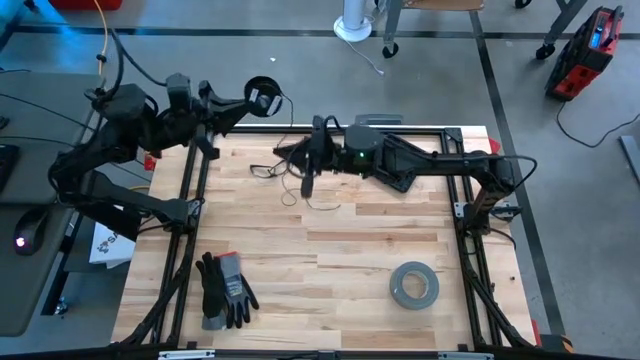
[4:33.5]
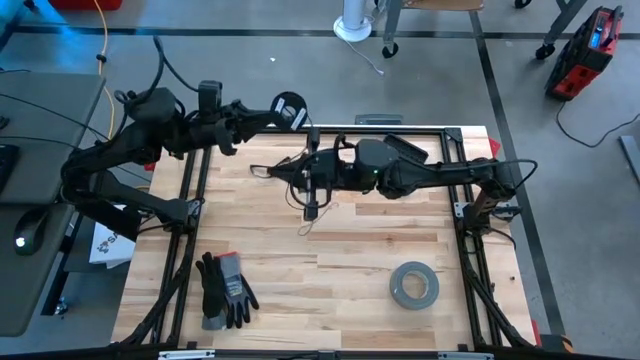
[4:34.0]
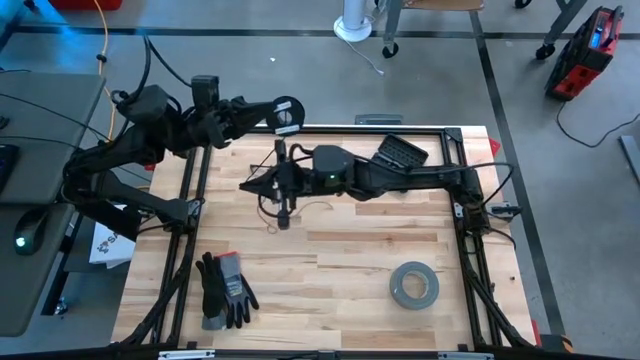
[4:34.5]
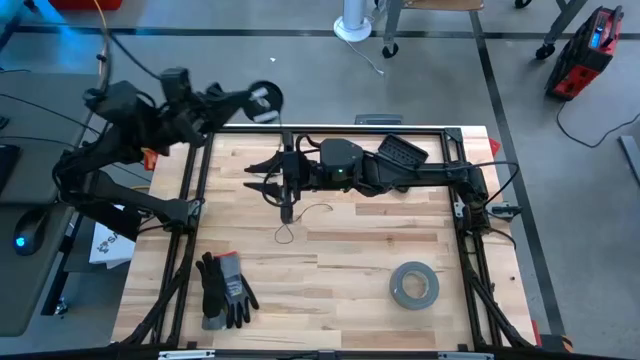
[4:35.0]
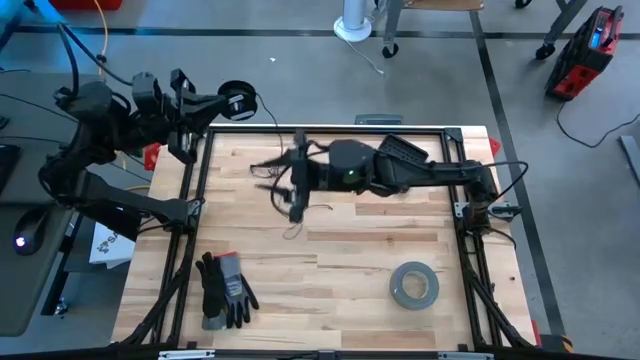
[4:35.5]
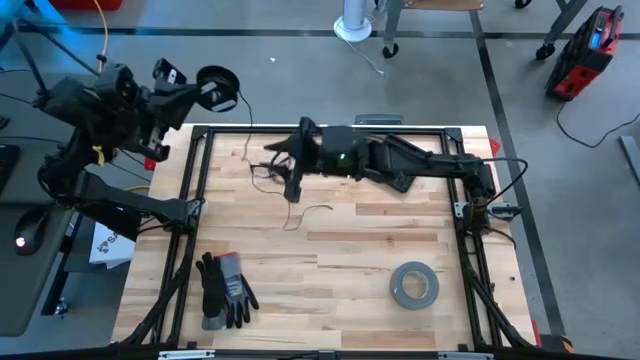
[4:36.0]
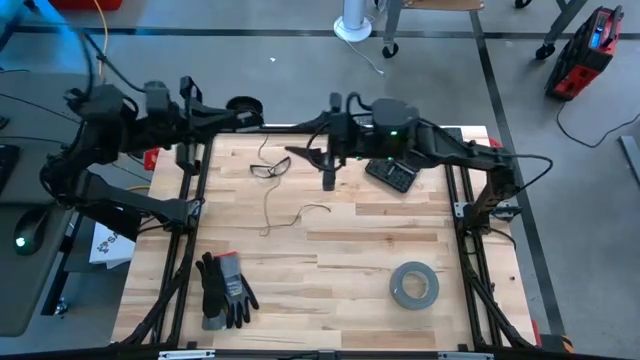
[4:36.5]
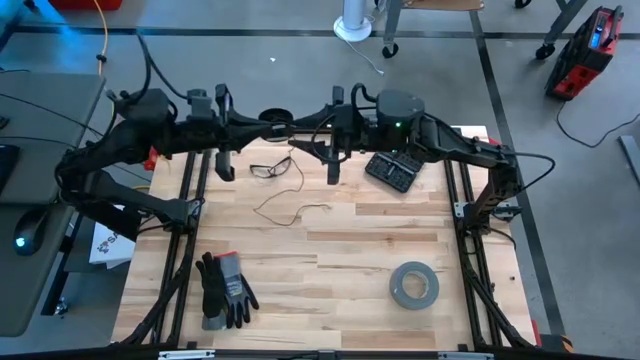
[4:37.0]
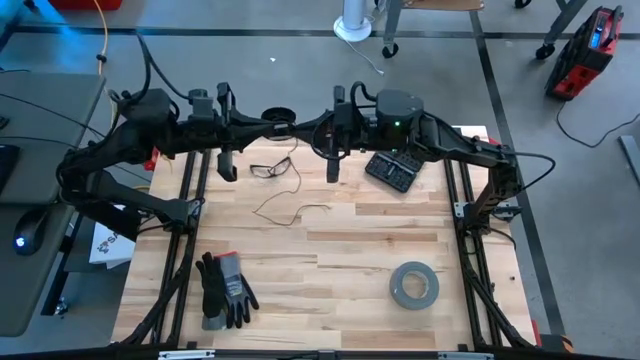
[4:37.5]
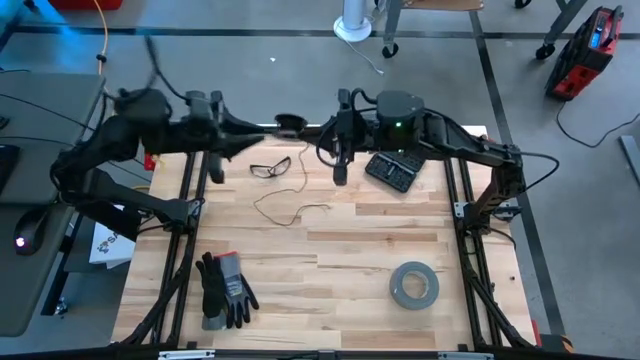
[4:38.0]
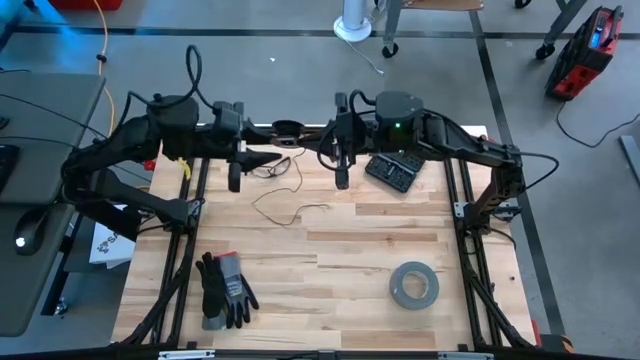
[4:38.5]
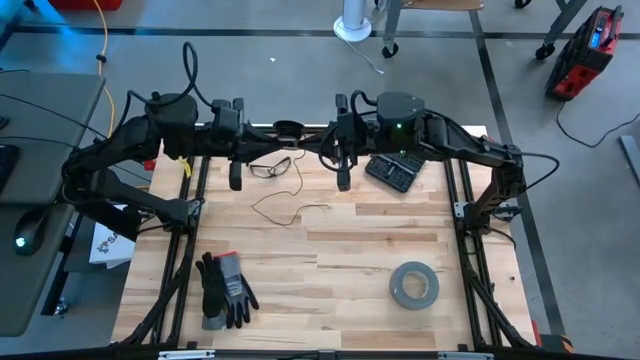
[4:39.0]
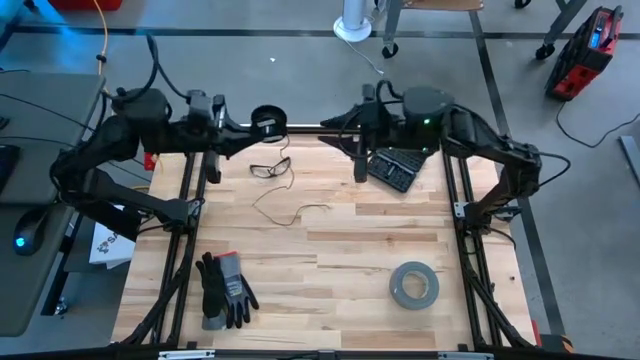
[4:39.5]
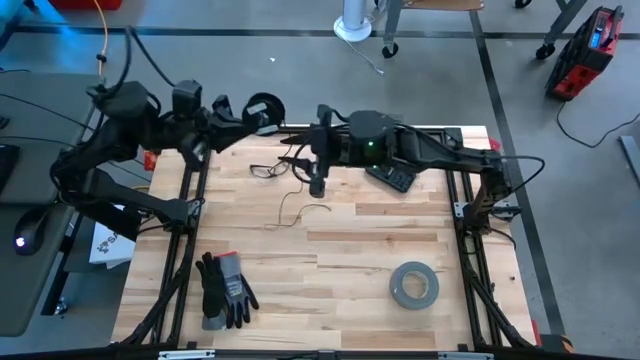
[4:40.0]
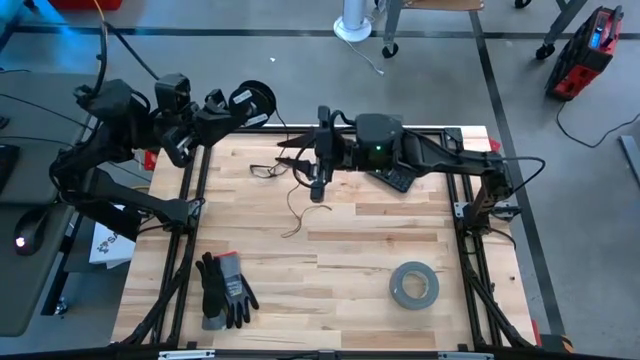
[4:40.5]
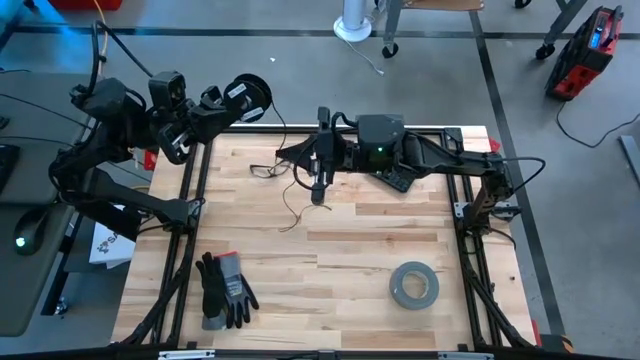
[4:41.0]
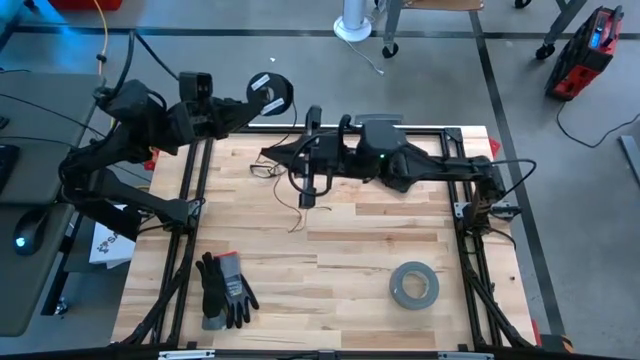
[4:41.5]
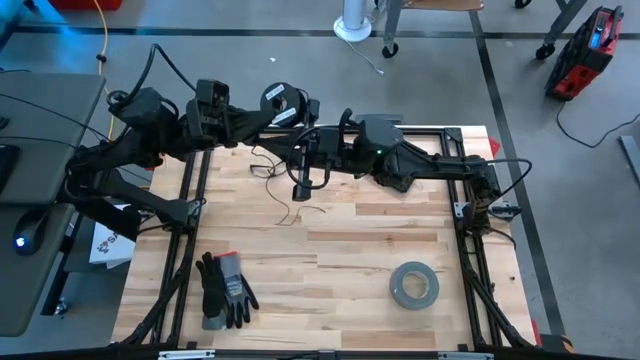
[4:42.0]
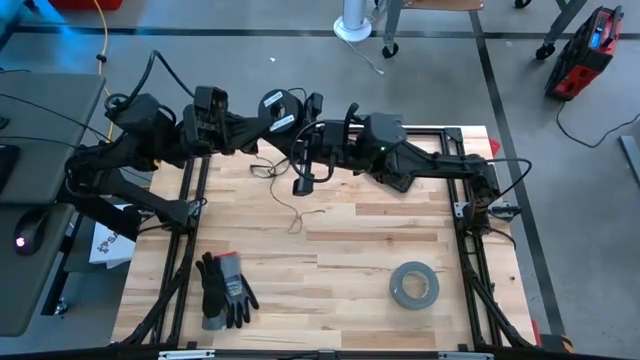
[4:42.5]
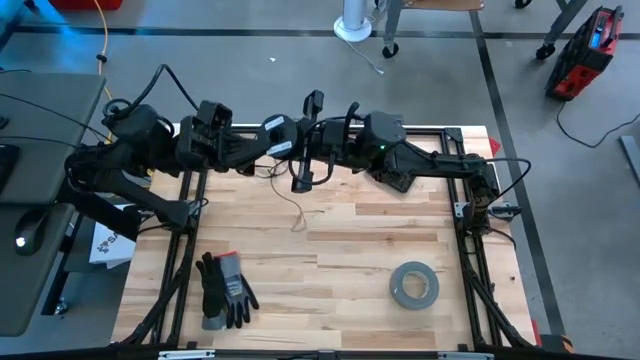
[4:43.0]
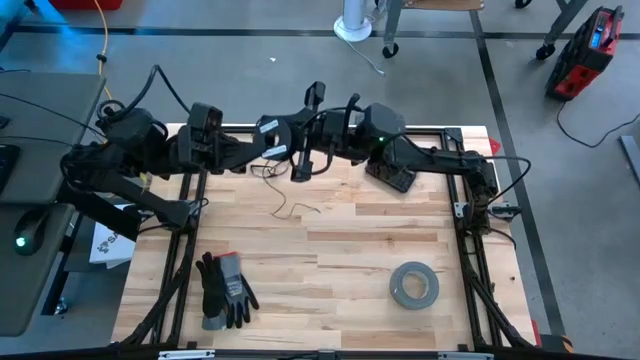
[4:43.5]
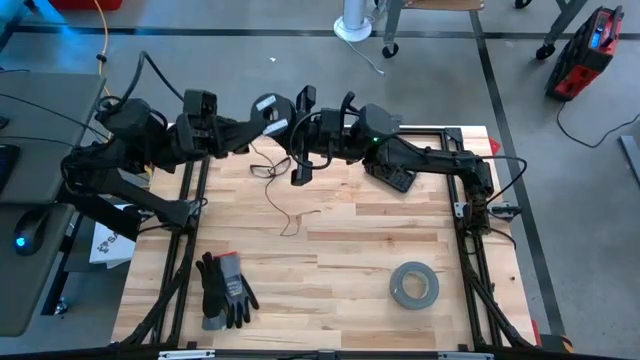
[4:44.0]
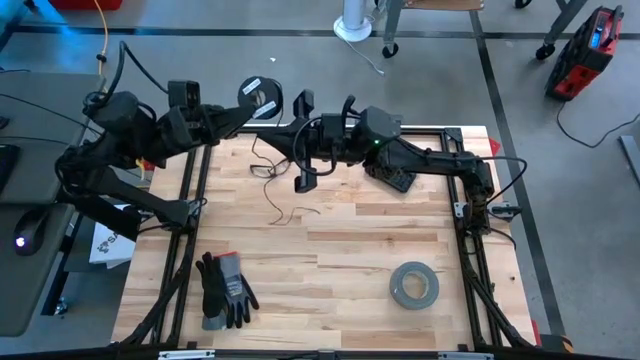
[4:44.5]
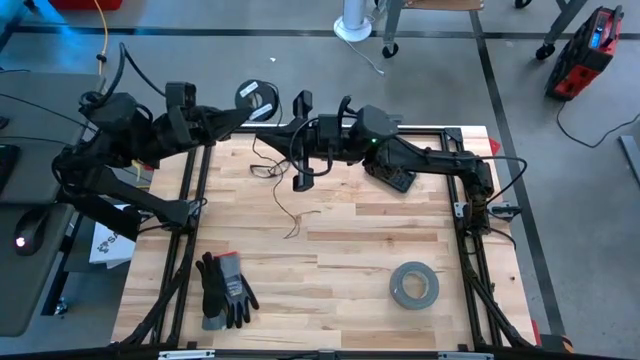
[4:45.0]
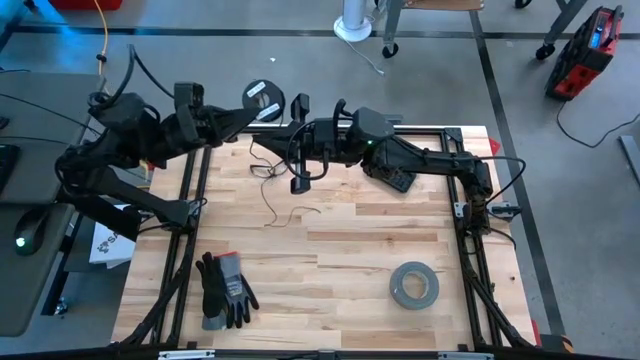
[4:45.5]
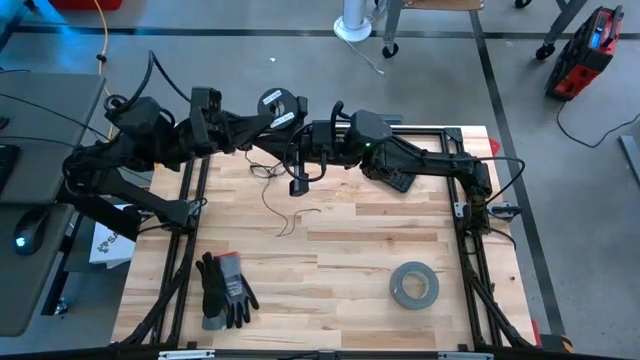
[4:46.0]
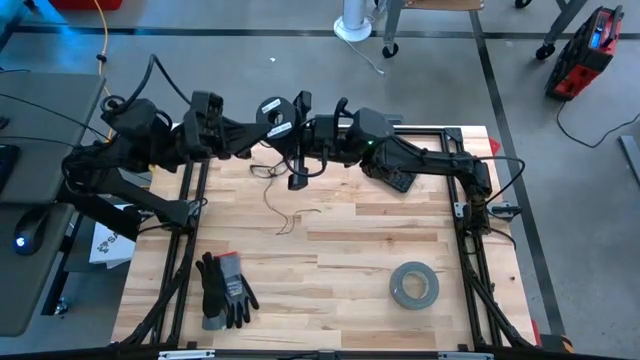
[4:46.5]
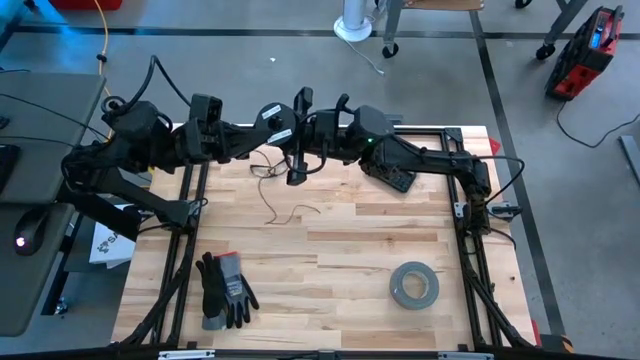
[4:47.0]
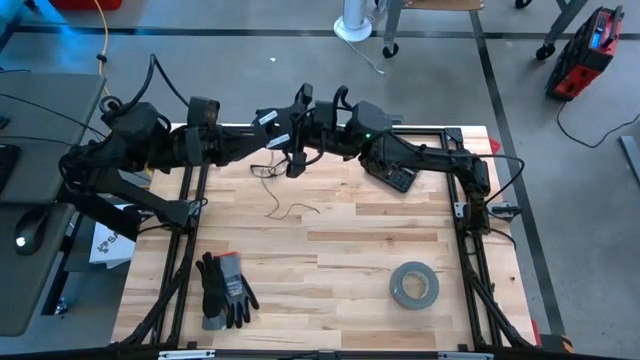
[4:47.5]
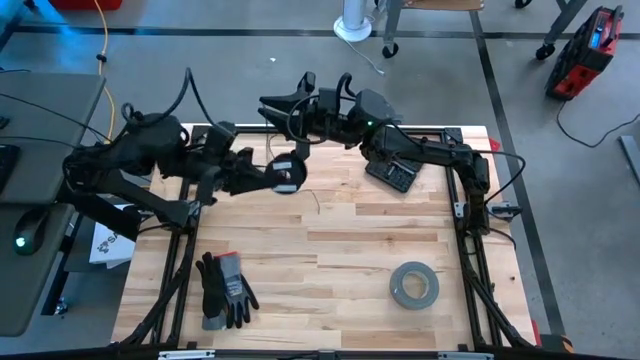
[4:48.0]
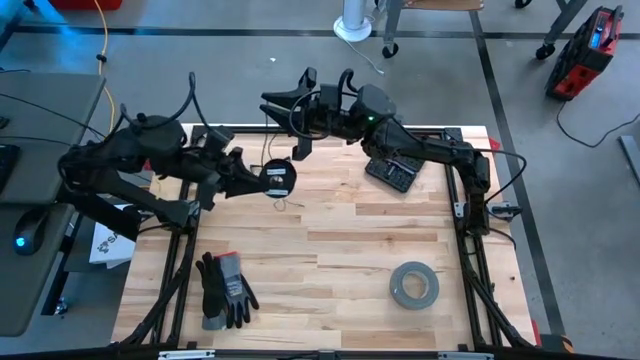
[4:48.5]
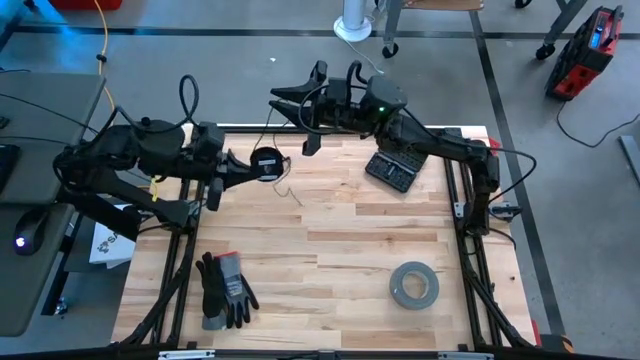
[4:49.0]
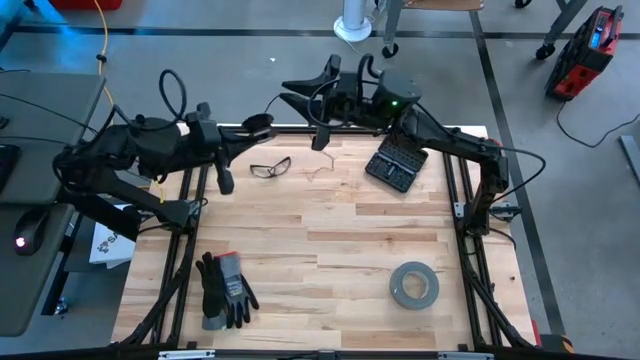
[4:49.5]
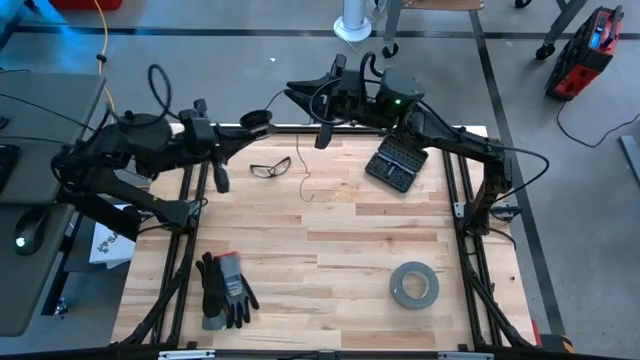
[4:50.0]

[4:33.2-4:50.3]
Task: Coil cords
Coil the black wire on the black spool
